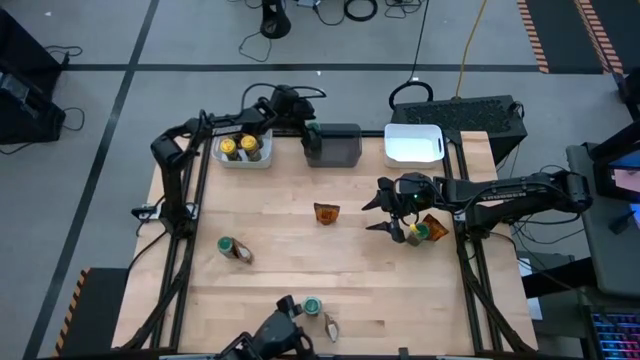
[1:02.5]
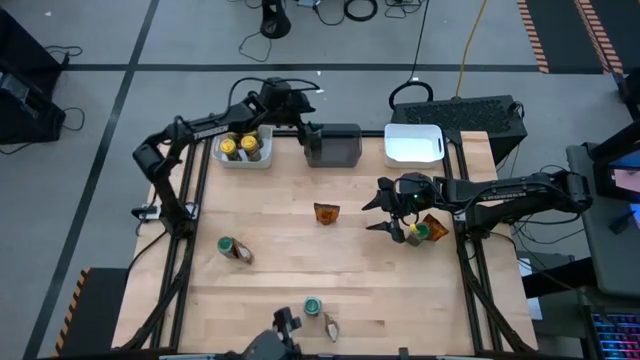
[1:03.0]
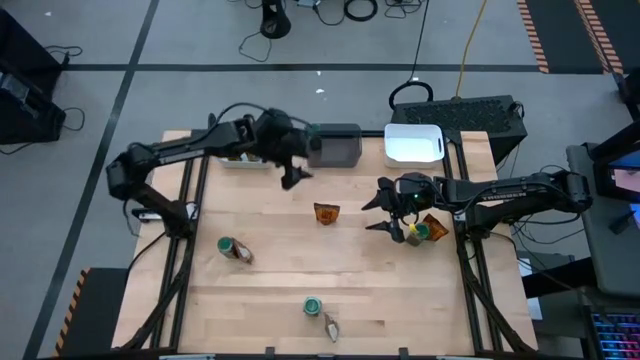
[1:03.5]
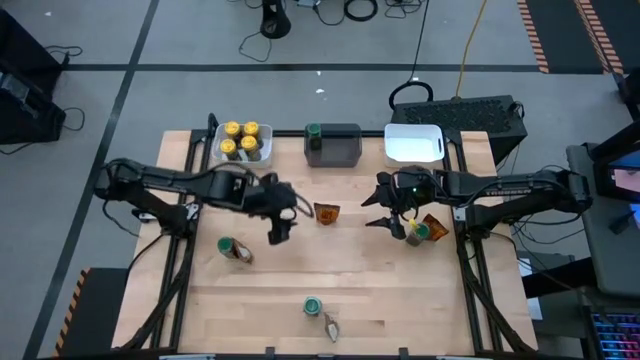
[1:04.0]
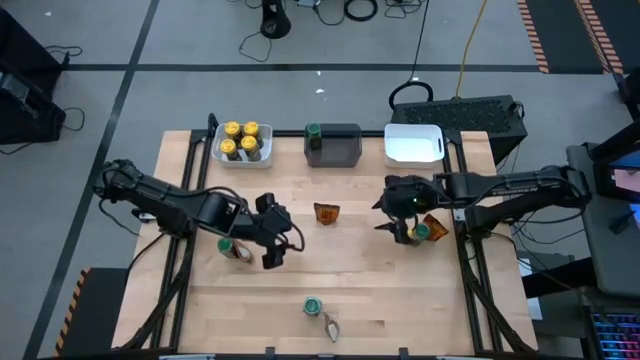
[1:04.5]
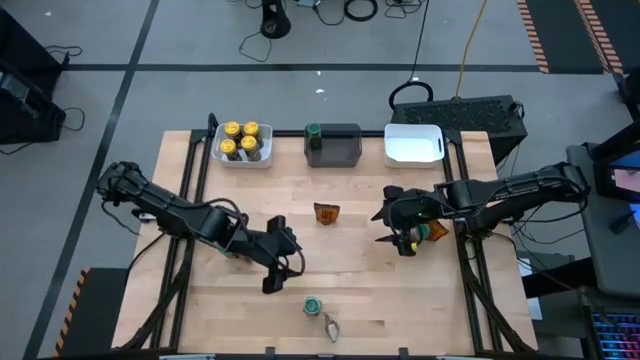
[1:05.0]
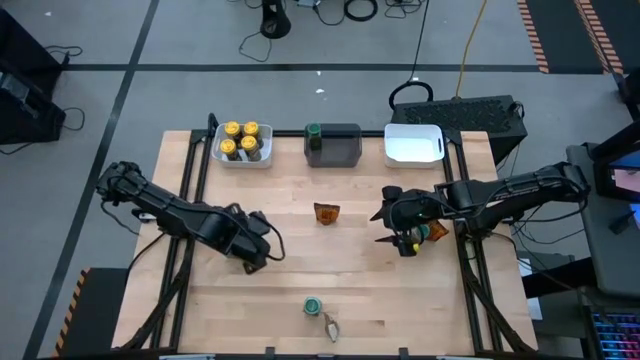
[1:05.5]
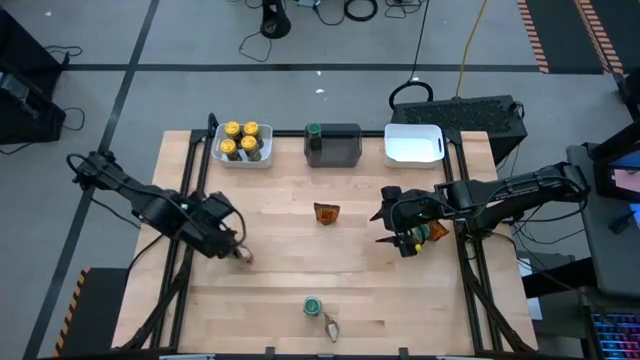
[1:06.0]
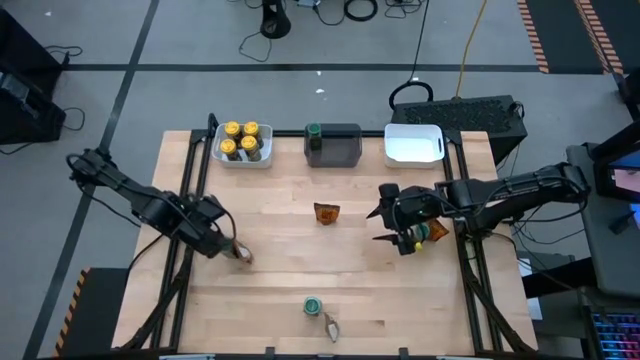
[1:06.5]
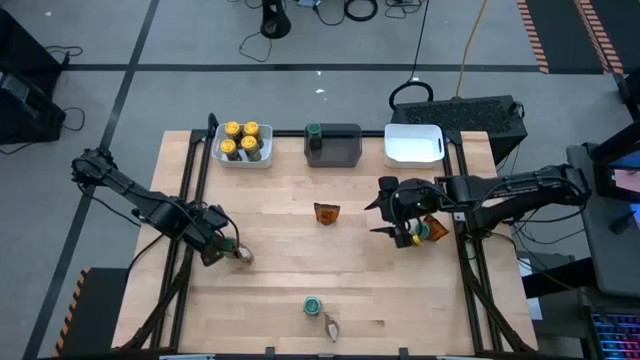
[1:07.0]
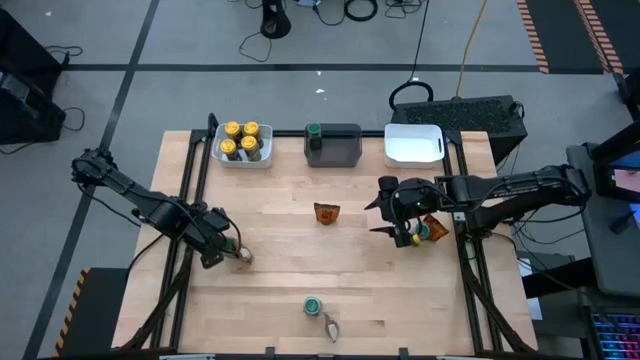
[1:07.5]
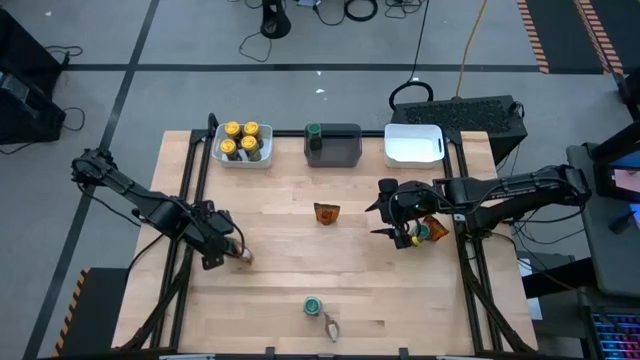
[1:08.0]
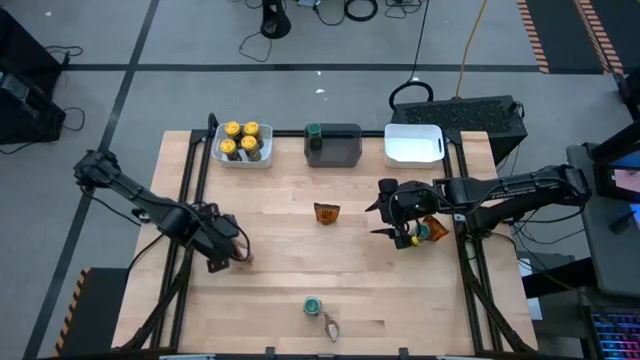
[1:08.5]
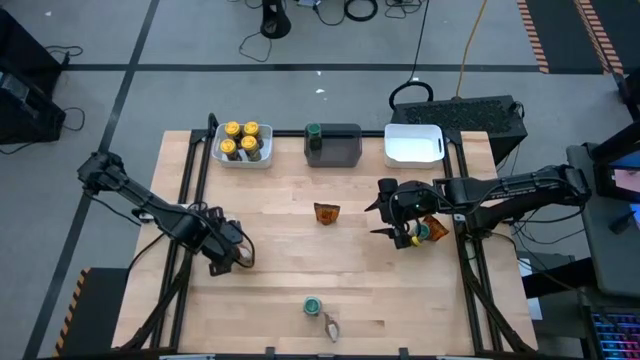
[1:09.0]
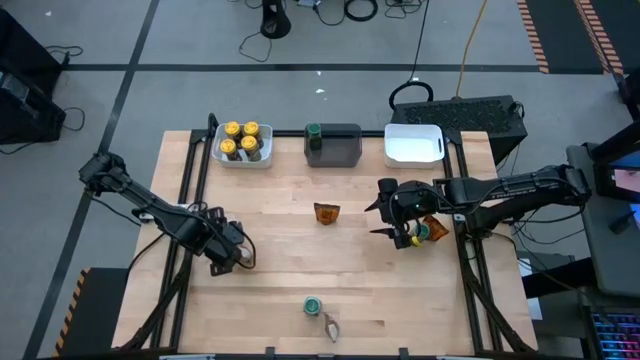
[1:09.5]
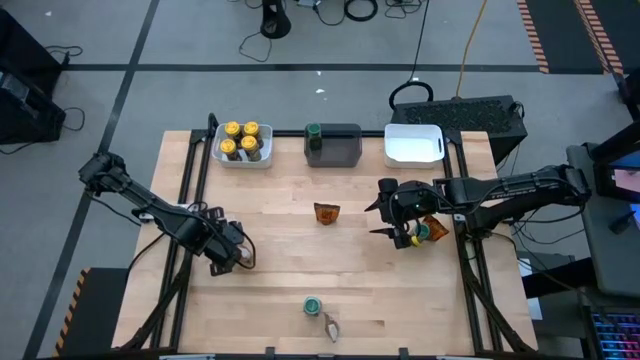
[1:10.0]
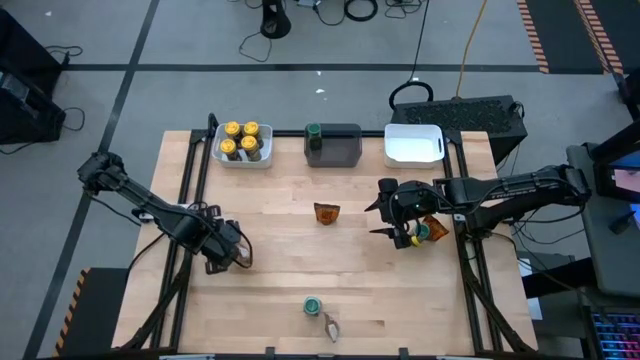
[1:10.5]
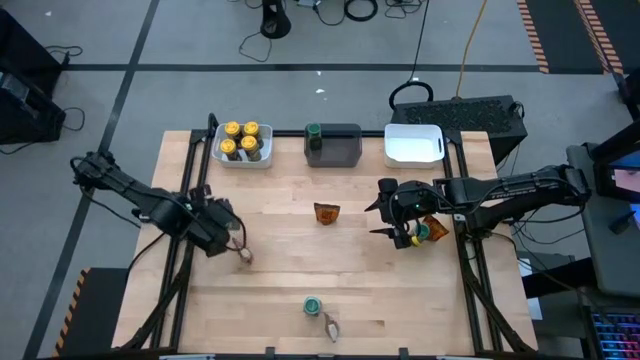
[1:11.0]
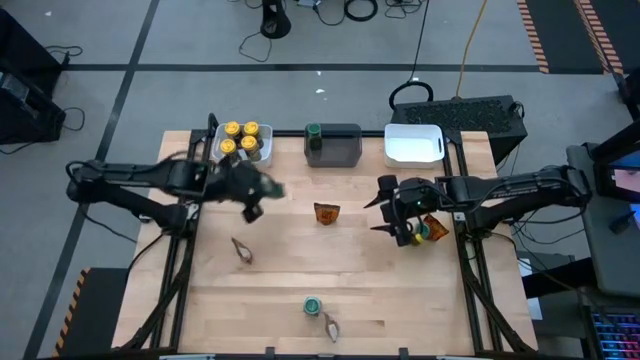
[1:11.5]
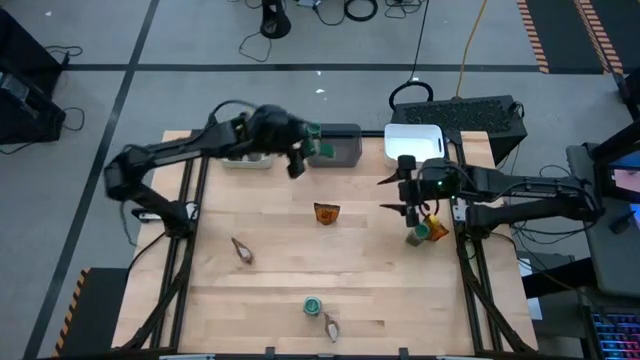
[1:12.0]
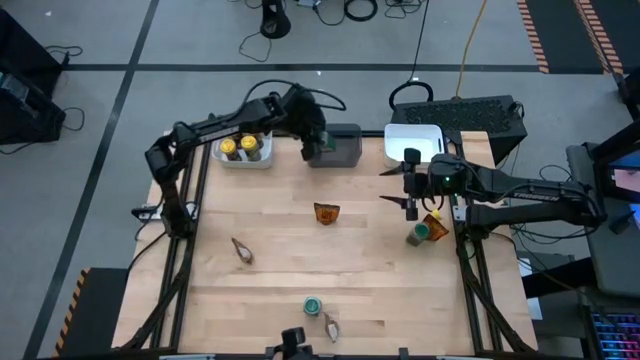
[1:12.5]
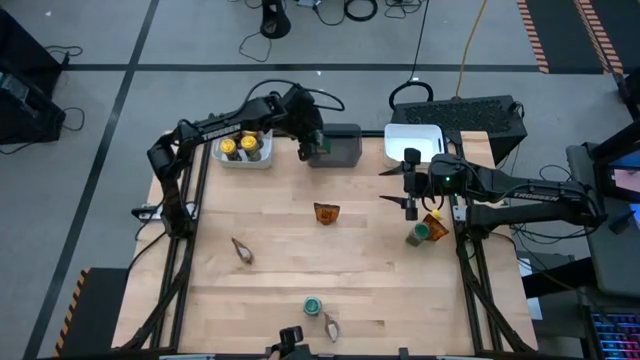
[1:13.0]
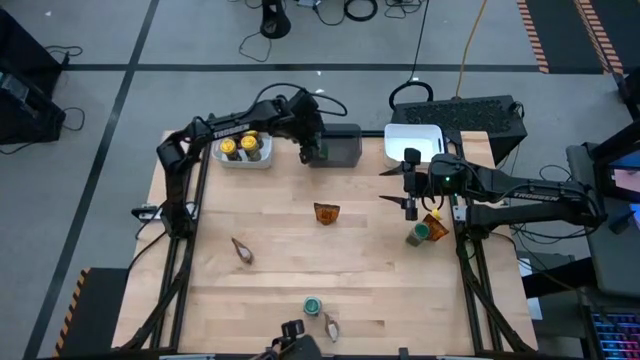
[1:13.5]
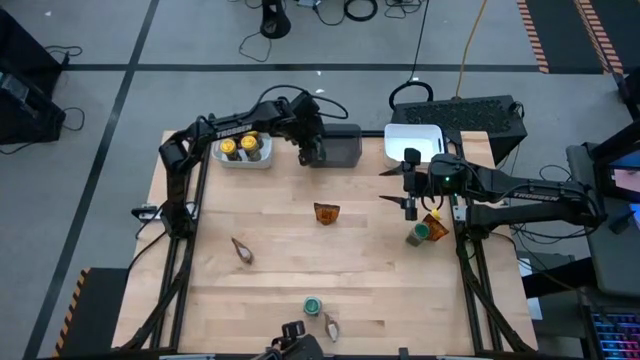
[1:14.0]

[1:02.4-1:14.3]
Task: Sort spices by type
Put the top left green seasoning bottle into the black bin

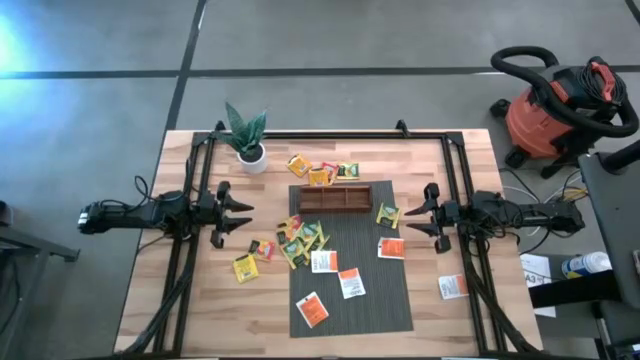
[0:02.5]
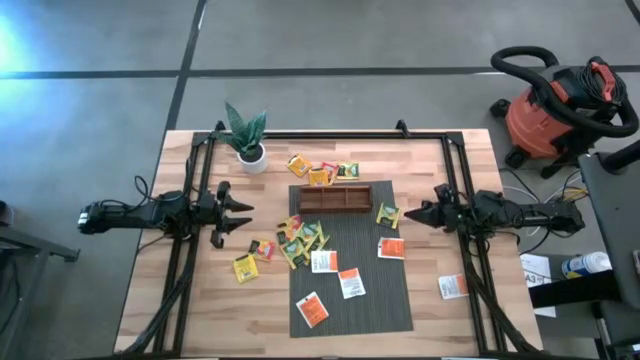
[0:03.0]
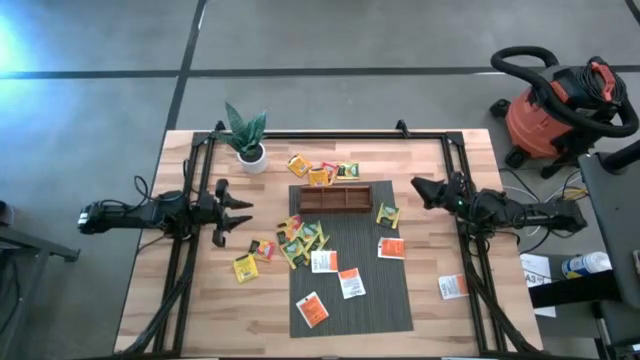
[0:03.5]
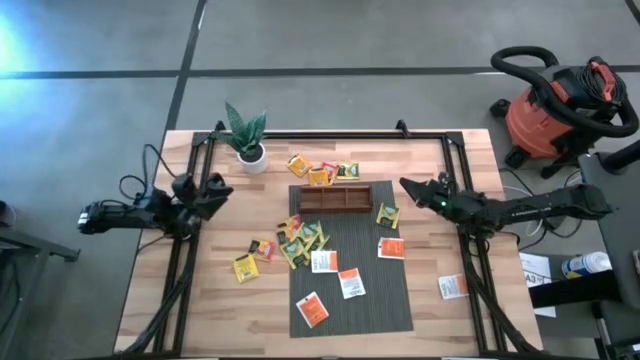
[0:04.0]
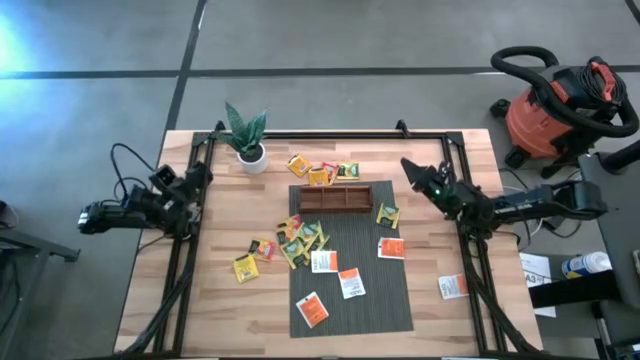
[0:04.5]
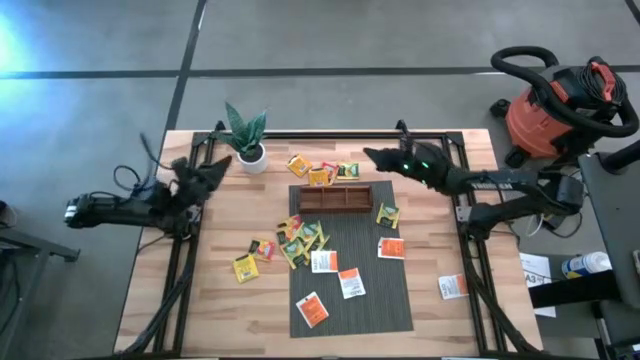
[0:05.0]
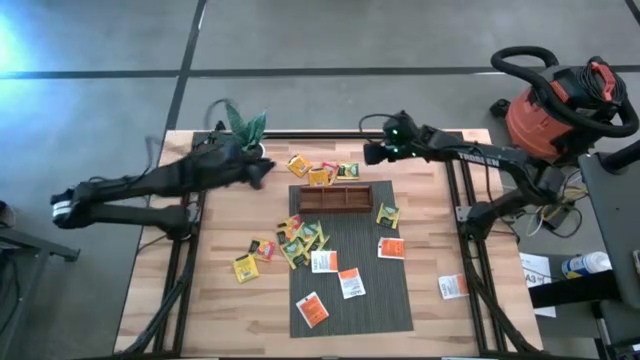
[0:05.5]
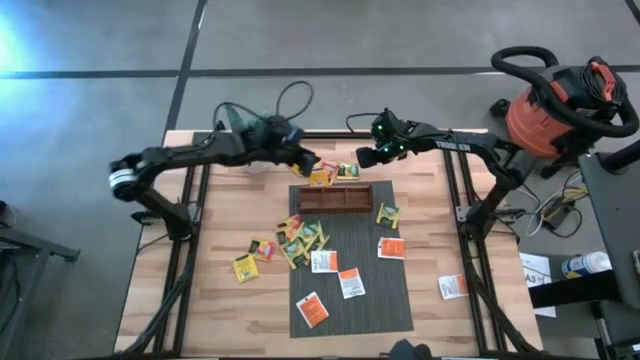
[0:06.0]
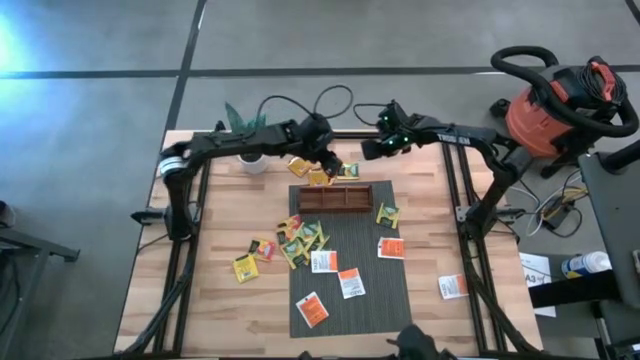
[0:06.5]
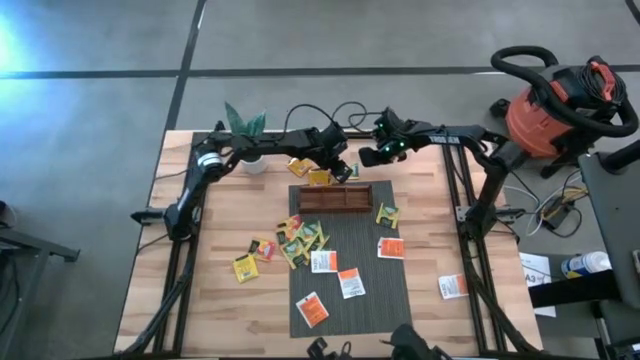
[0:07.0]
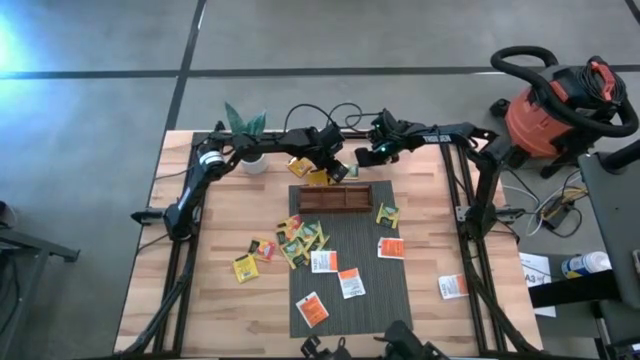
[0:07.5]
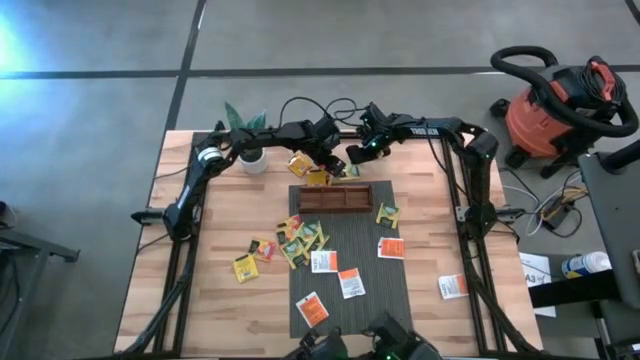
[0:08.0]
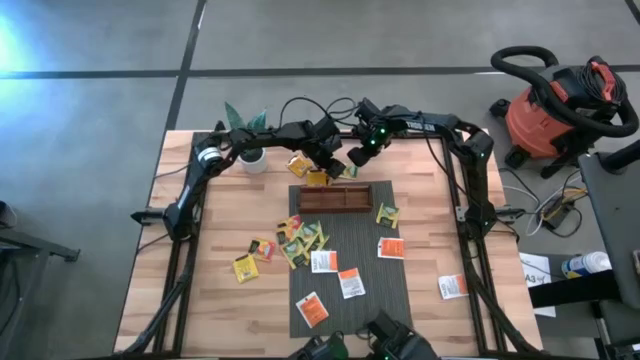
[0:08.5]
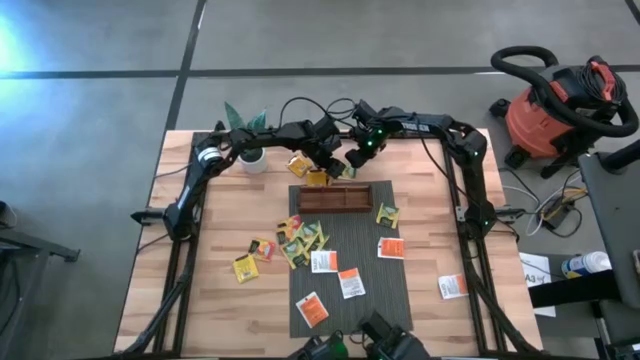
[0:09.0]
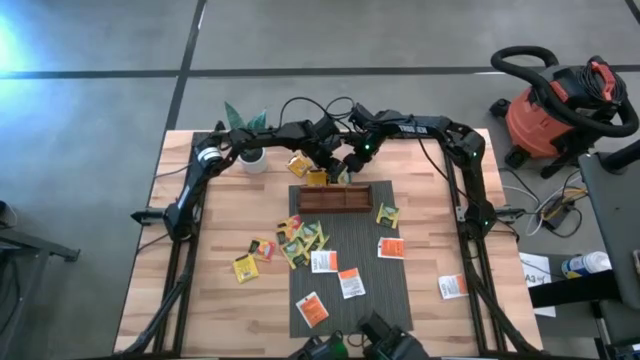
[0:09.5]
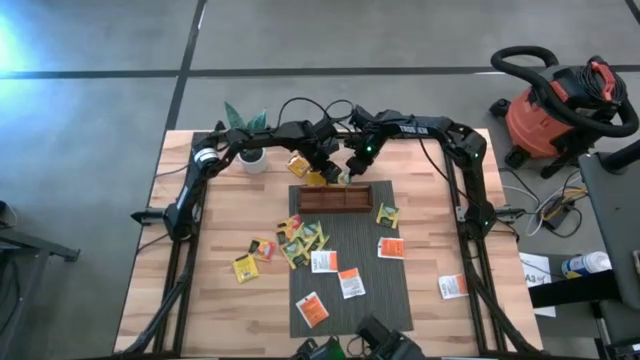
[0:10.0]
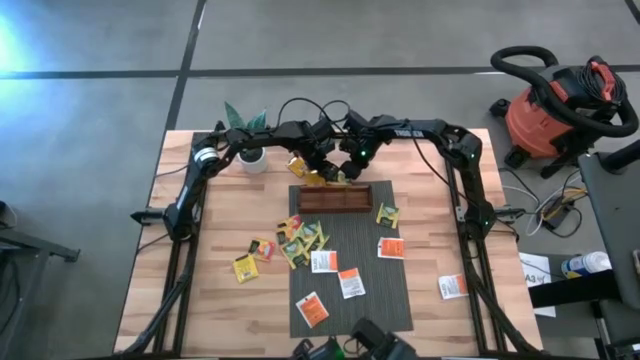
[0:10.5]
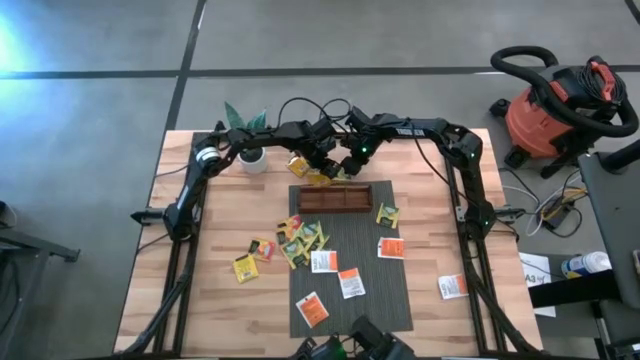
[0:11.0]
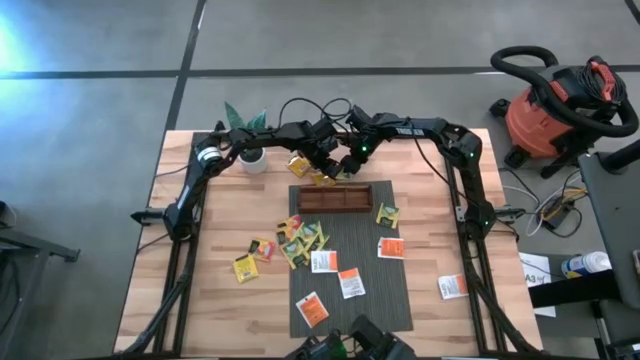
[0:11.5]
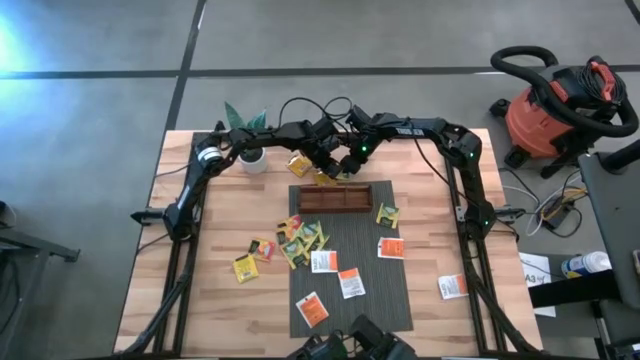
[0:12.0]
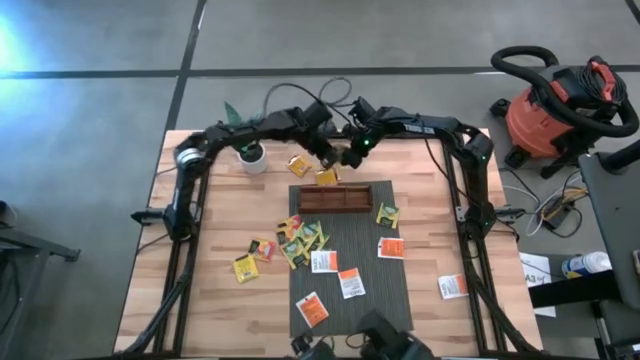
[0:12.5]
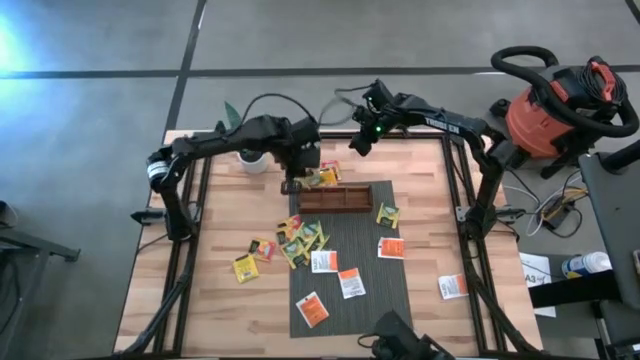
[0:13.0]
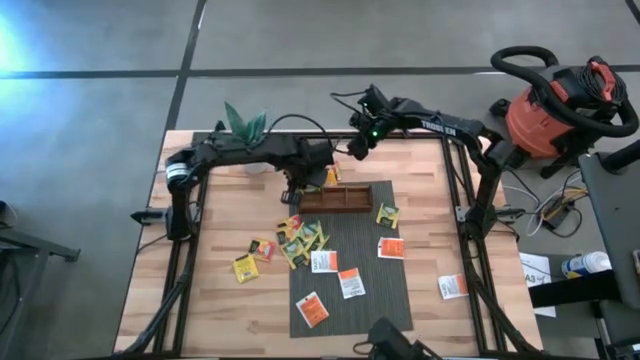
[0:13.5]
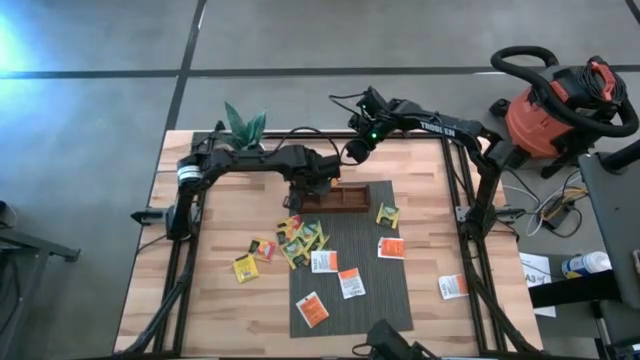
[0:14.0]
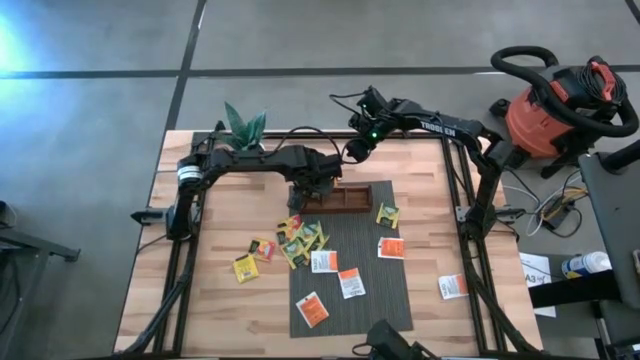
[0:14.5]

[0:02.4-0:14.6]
Task: Pick & Place Tea
Put the yellow tea bag into the left compartment of the wooden organizer
